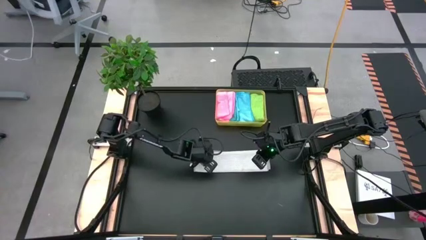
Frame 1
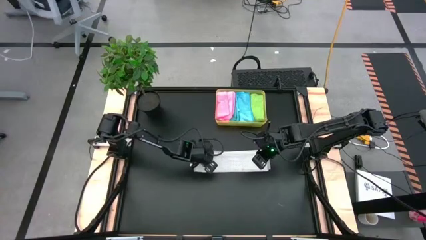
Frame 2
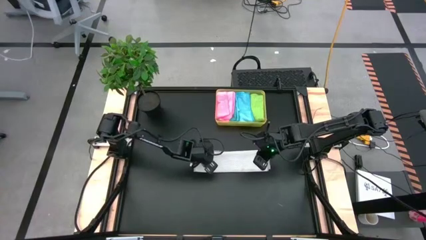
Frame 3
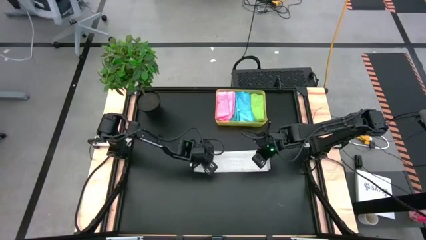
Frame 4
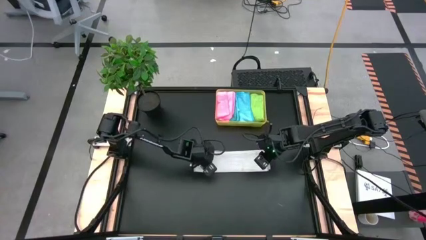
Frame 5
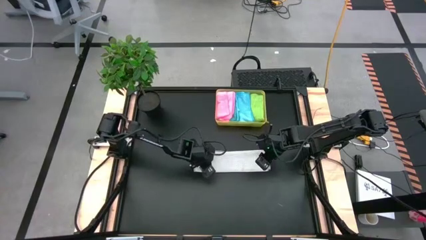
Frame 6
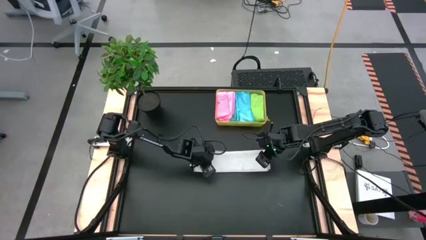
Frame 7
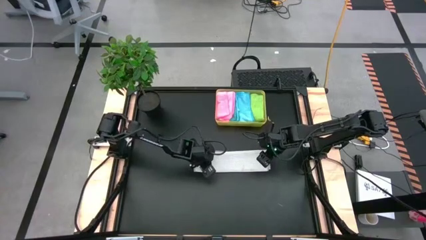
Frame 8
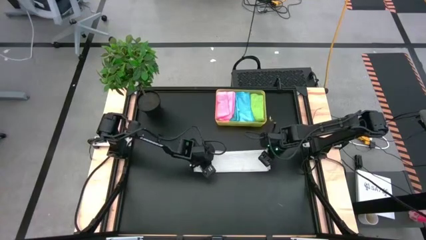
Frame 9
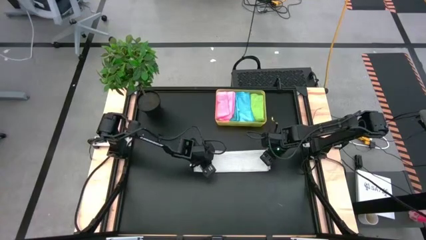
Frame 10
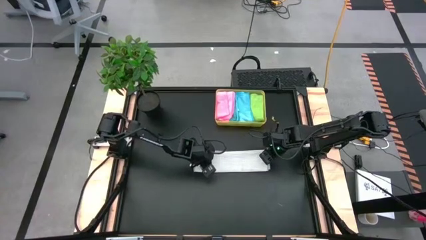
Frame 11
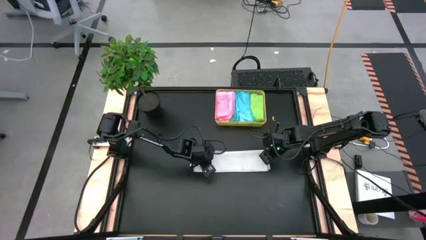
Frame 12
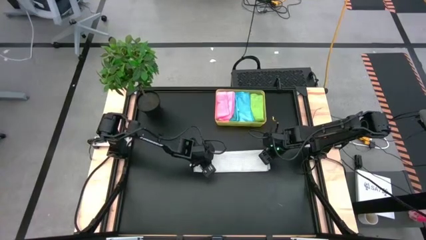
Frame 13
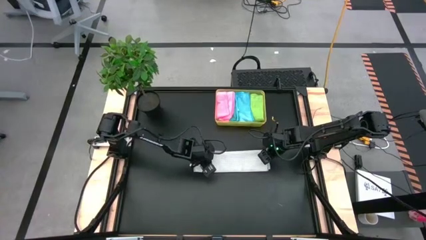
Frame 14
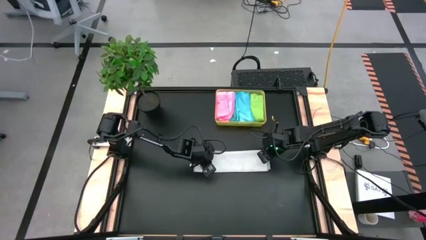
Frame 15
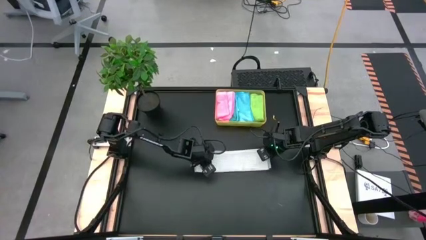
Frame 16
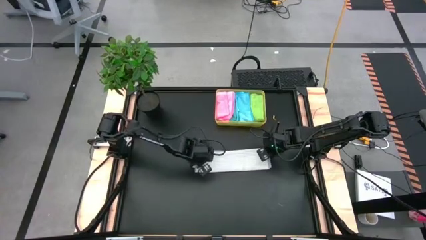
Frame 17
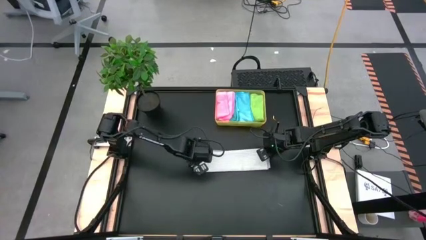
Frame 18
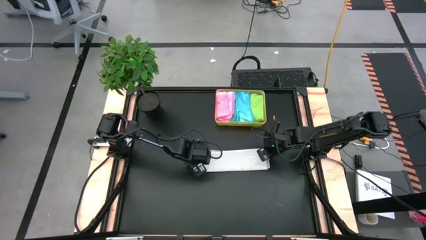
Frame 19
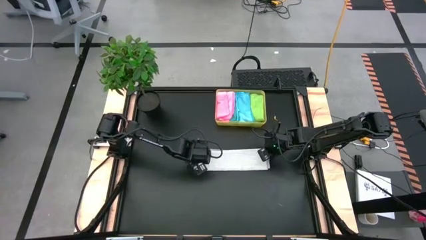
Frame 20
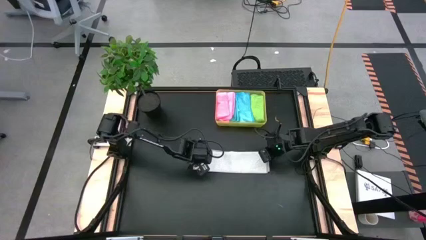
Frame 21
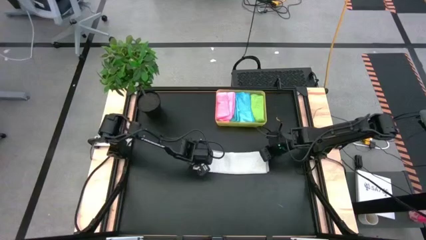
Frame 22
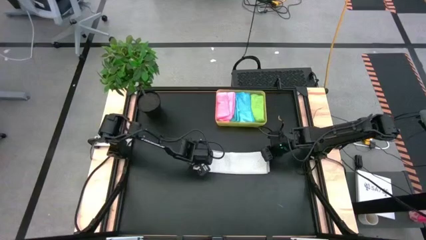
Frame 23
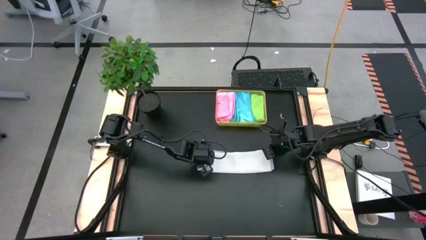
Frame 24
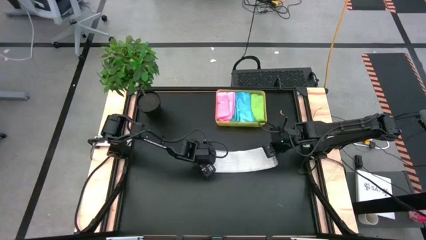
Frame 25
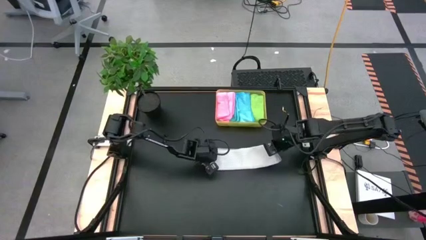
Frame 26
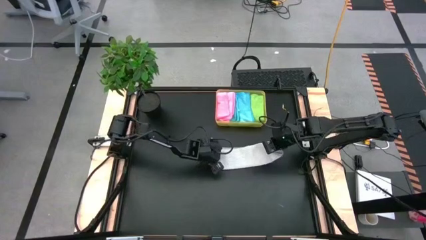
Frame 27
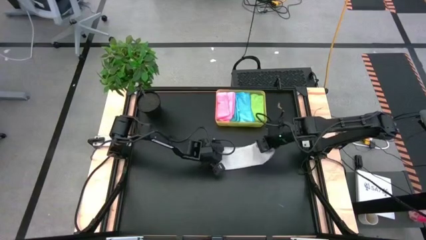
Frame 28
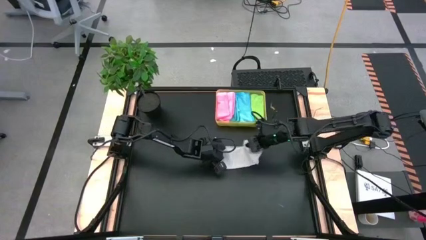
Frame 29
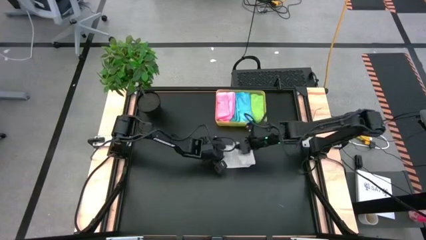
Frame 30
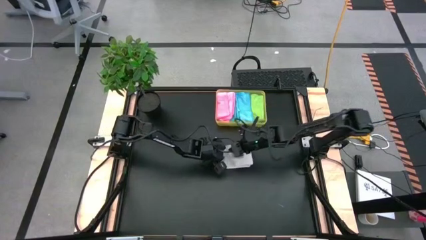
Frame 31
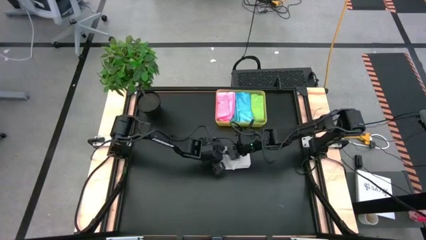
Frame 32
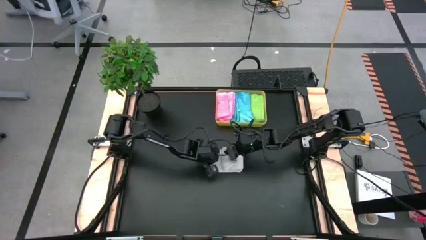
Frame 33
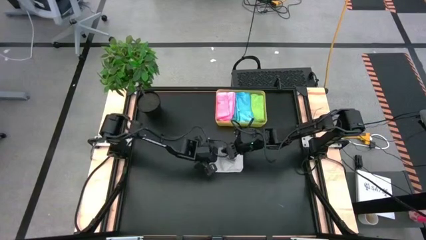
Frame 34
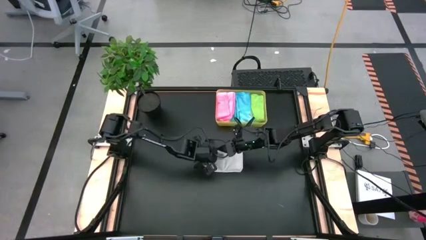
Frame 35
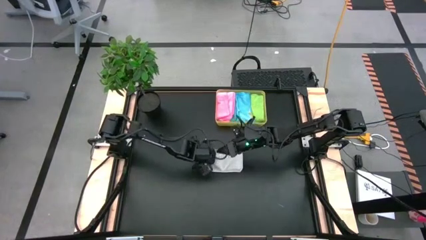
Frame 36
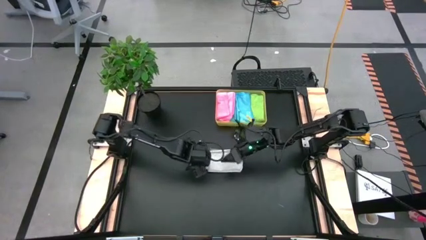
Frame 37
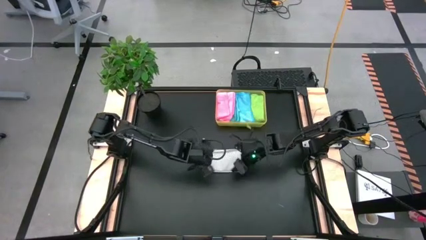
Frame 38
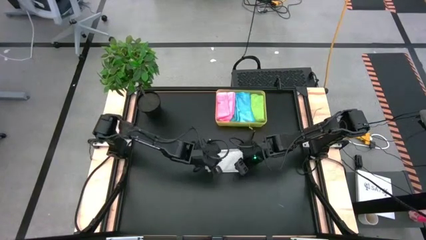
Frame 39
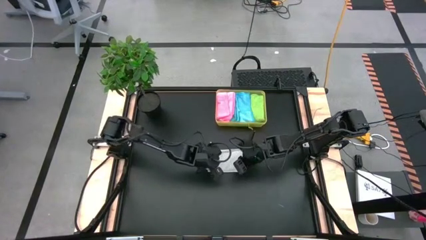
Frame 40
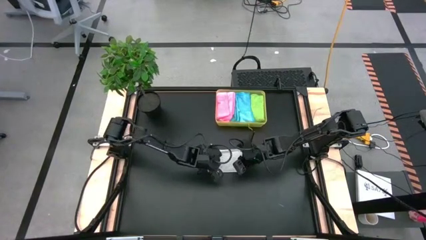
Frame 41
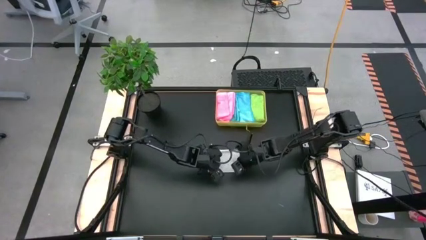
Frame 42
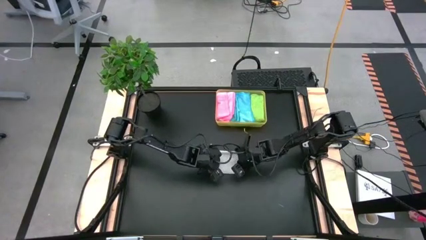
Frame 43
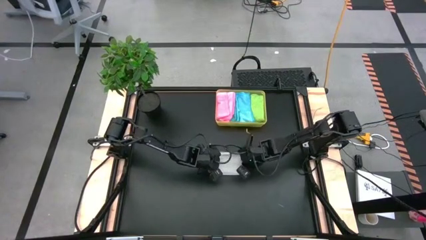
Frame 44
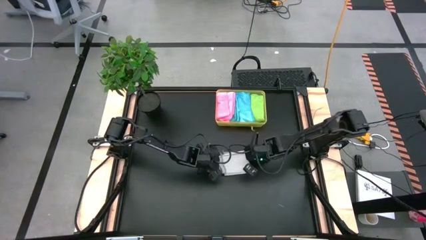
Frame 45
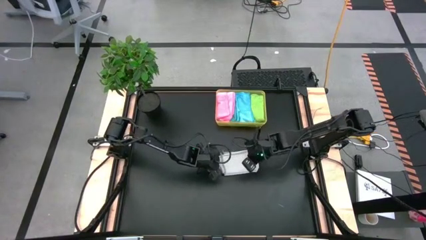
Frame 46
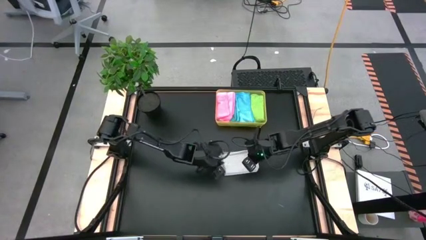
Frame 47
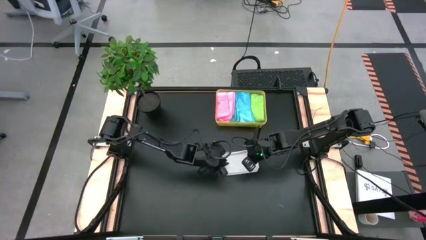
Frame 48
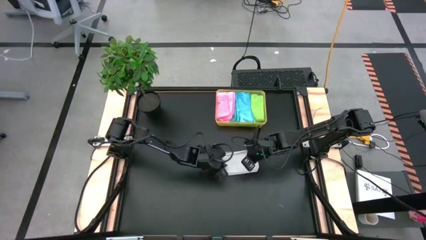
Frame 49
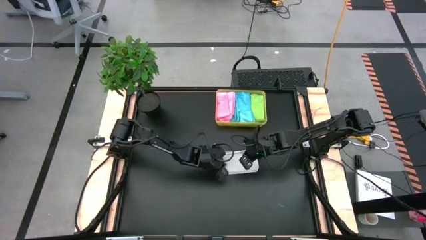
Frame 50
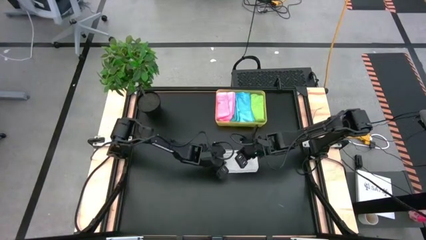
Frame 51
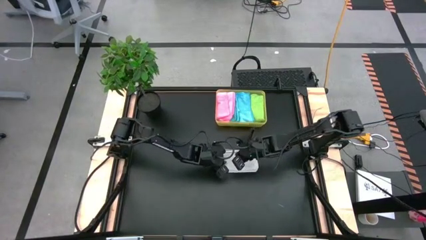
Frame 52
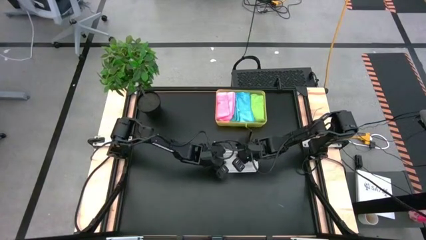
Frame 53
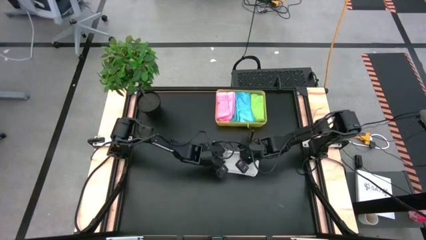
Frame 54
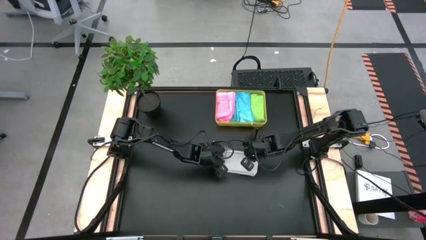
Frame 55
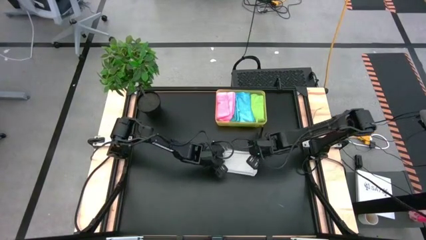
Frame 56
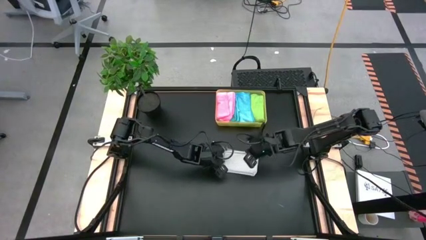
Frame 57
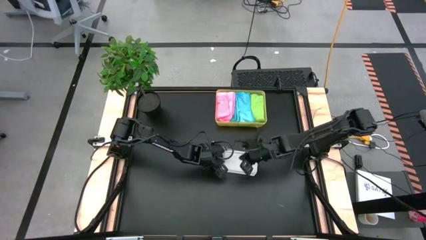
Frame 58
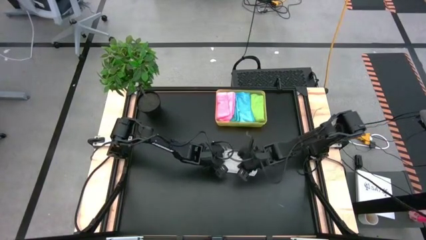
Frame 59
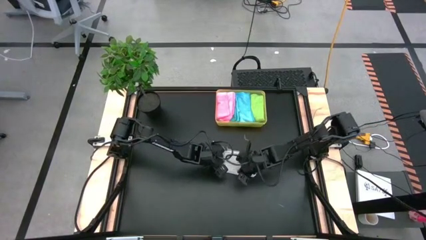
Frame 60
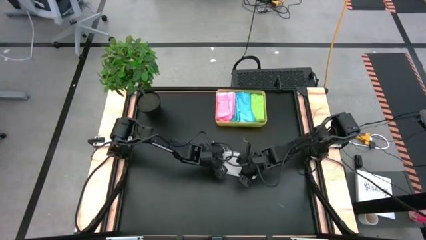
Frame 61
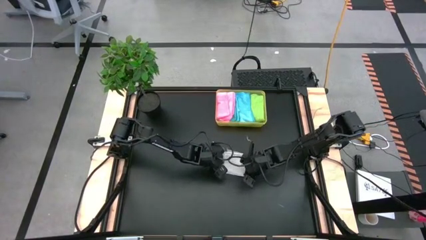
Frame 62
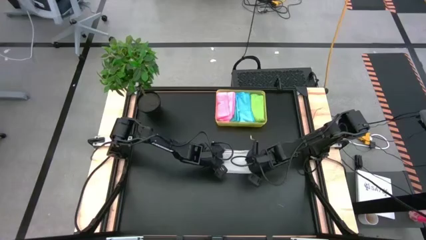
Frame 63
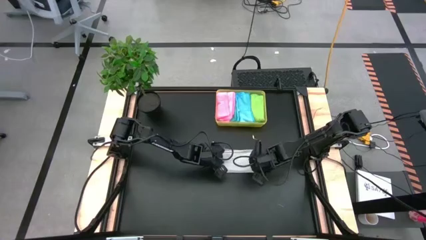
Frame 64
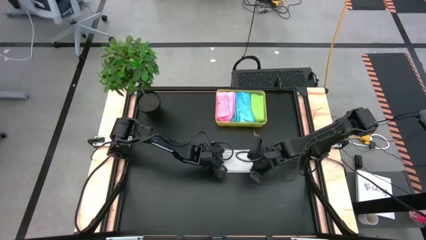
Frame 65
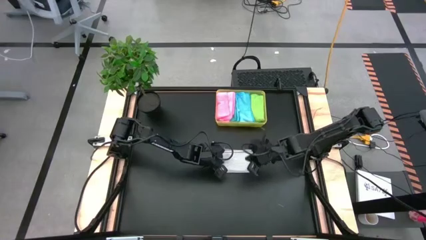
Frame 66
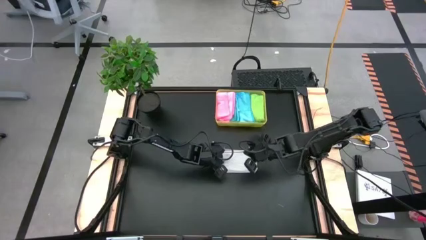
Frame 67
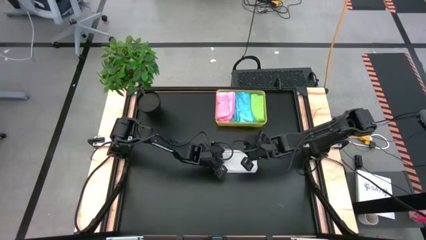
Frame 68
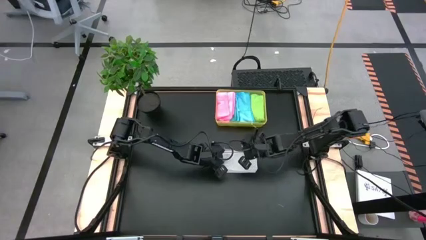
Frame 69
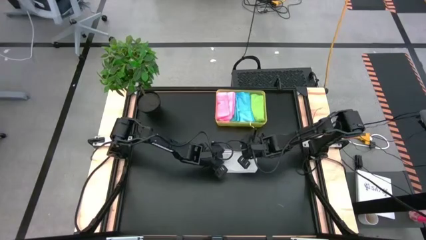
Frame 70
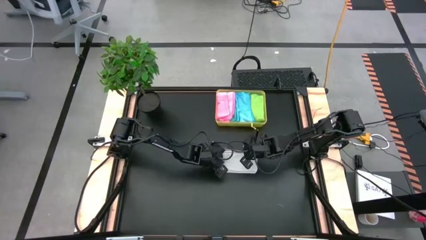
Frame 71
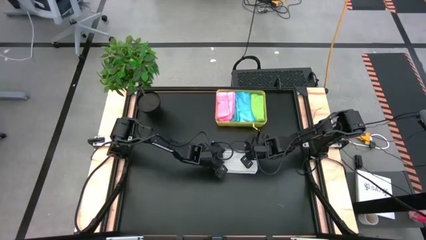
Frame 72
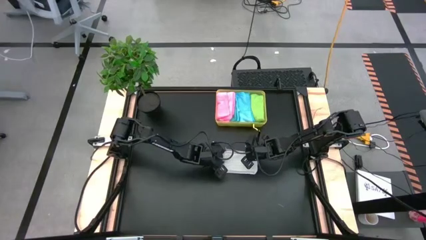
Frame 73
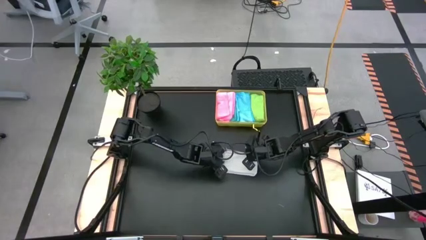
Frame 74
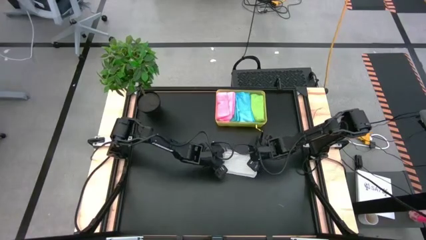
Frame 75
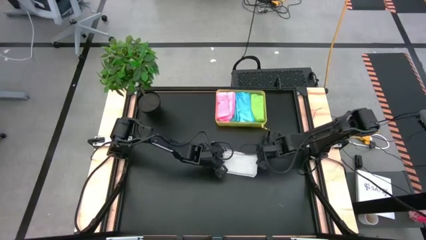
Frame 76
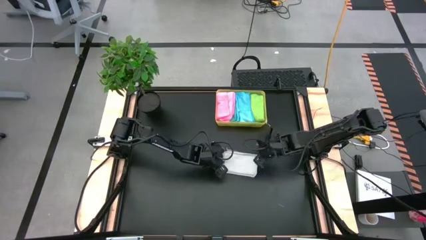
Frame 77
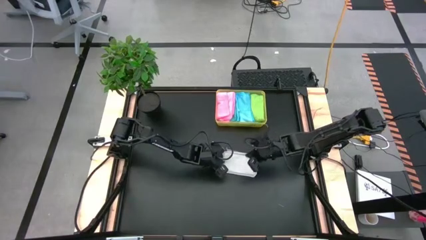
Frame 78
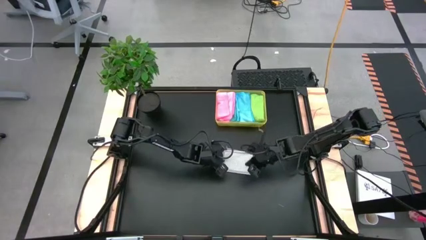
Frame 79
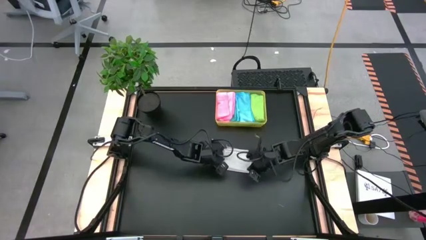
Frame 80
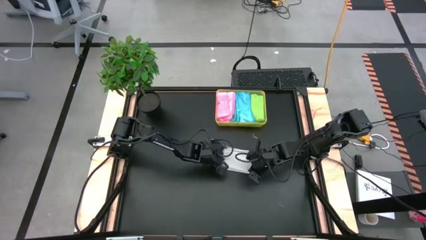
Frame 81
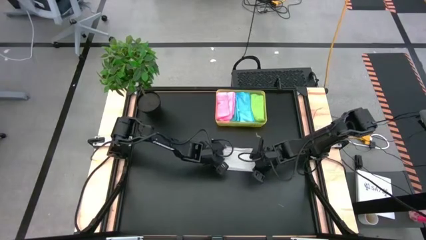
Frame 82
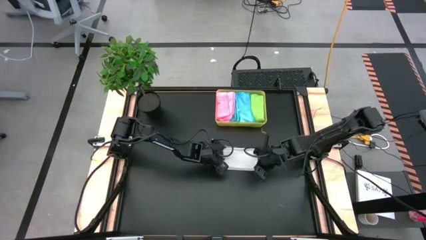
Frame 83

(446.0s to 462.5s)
Task: Fold microfiber towels
Fold the white microfiber cloth
